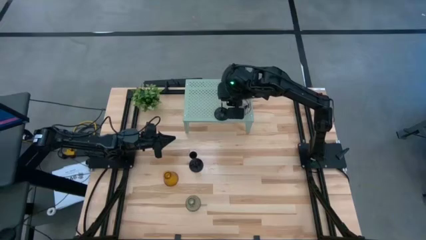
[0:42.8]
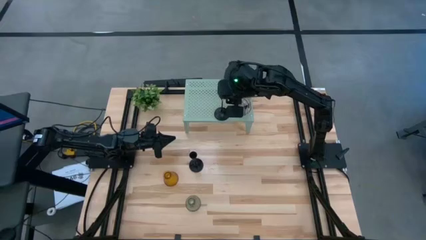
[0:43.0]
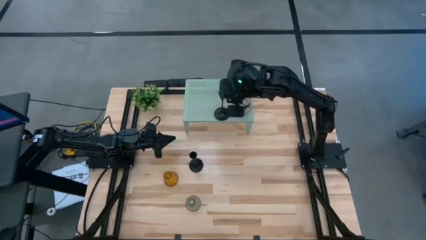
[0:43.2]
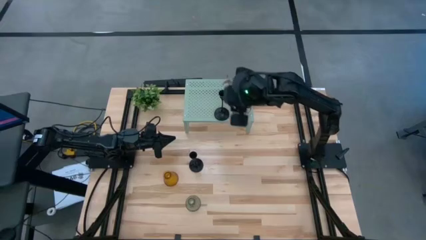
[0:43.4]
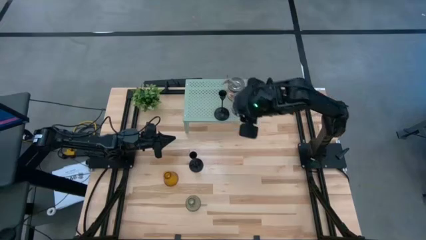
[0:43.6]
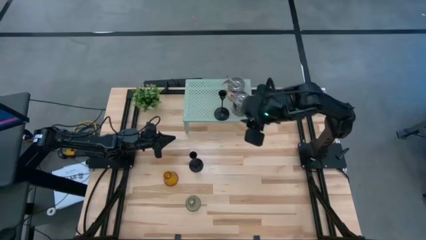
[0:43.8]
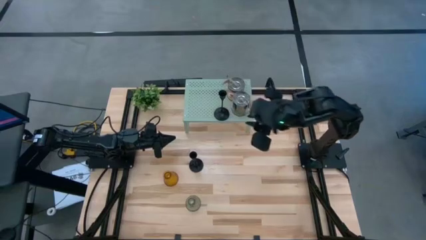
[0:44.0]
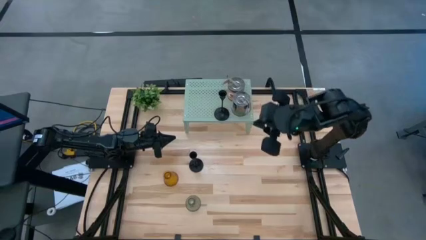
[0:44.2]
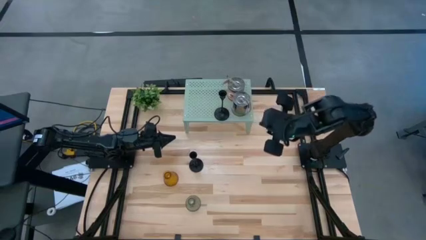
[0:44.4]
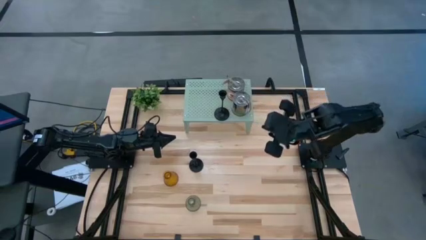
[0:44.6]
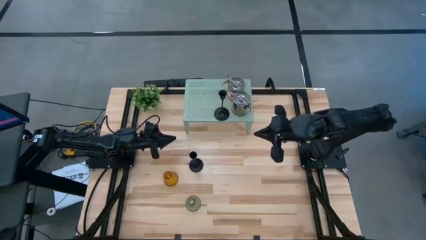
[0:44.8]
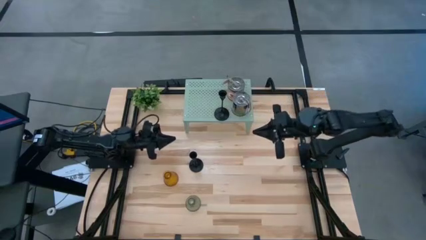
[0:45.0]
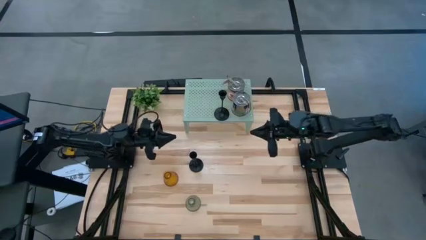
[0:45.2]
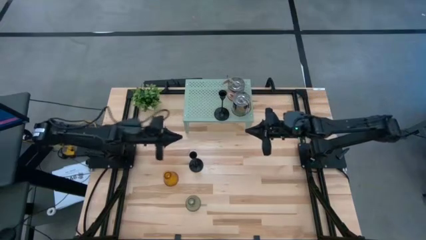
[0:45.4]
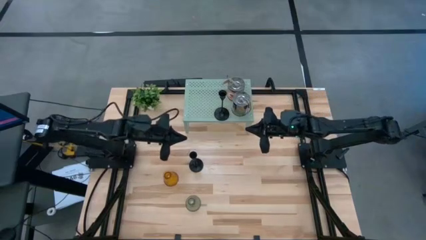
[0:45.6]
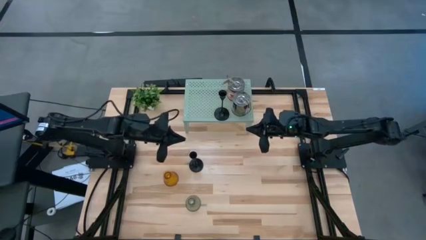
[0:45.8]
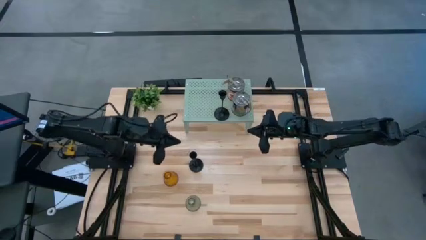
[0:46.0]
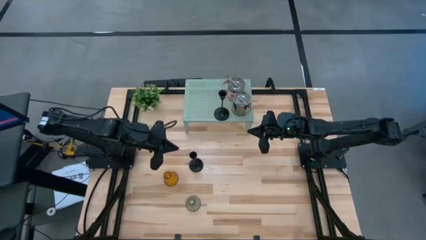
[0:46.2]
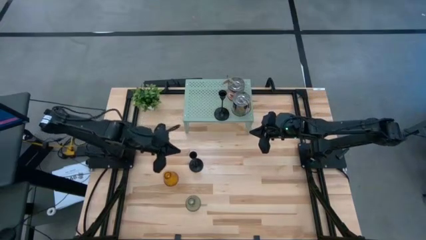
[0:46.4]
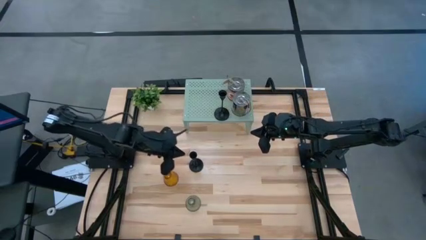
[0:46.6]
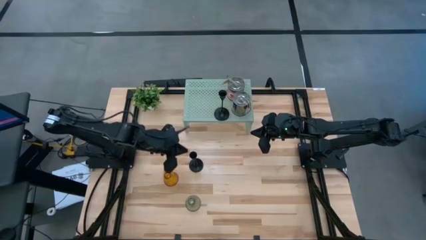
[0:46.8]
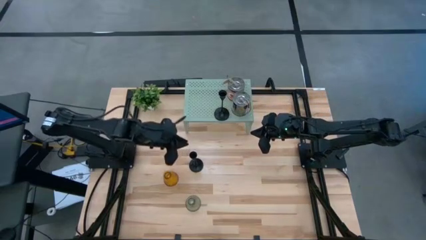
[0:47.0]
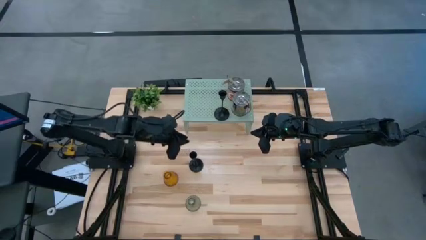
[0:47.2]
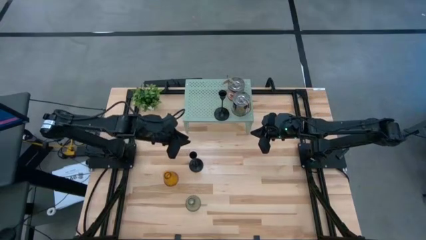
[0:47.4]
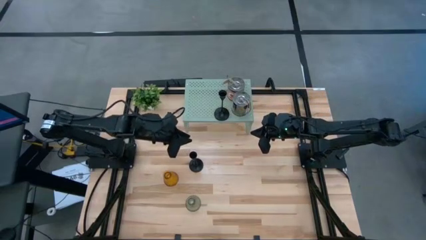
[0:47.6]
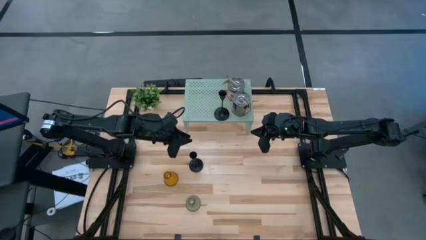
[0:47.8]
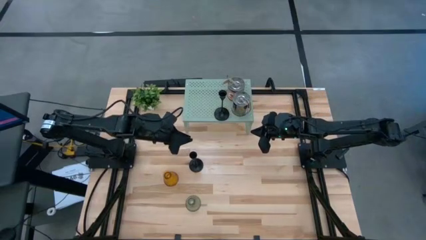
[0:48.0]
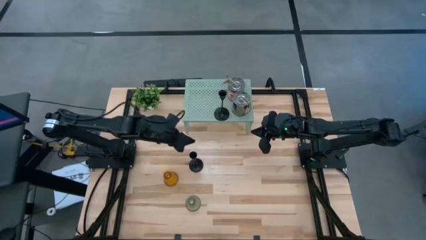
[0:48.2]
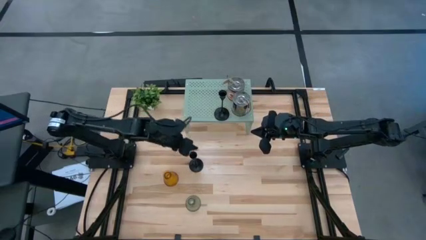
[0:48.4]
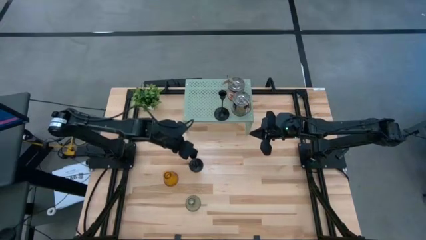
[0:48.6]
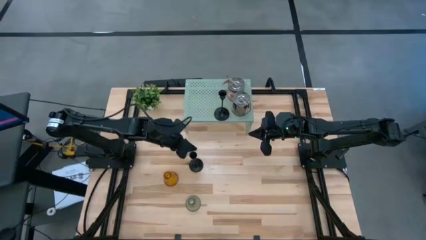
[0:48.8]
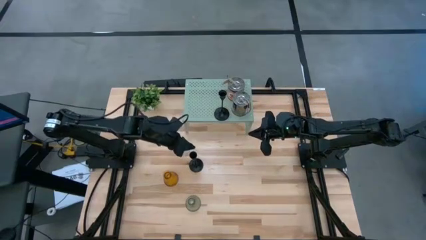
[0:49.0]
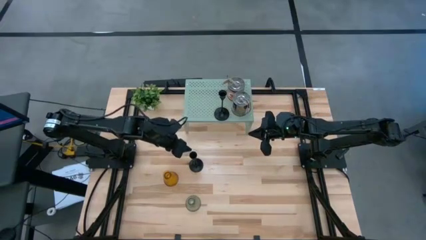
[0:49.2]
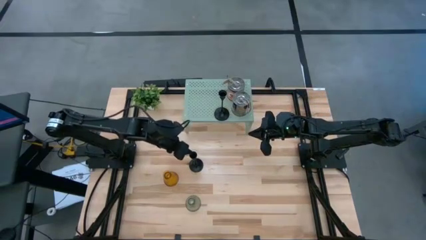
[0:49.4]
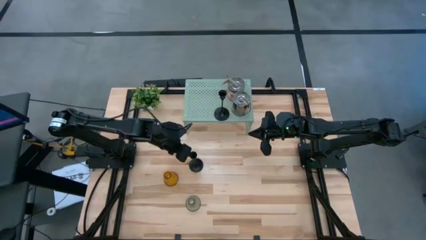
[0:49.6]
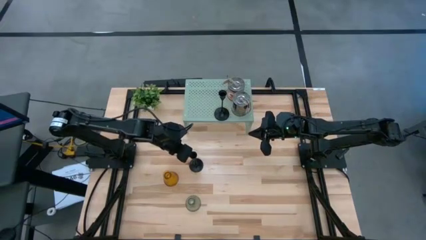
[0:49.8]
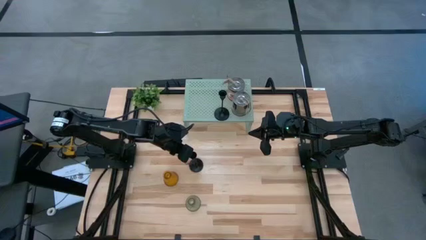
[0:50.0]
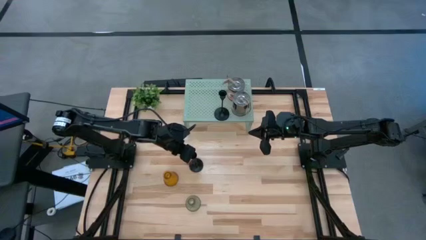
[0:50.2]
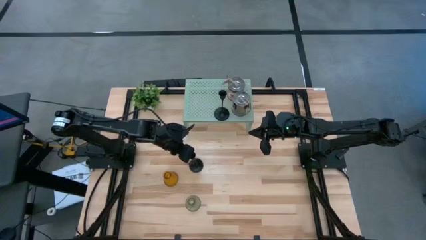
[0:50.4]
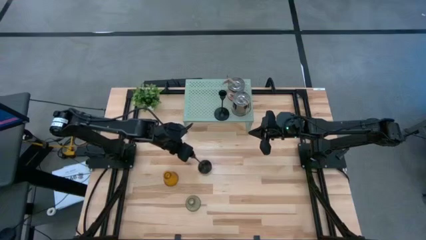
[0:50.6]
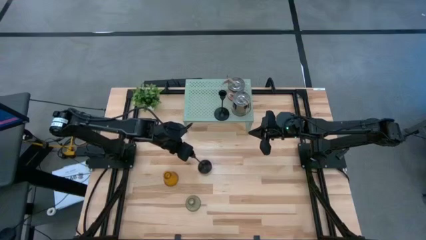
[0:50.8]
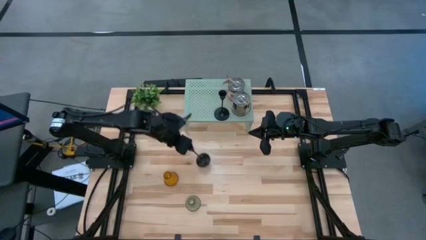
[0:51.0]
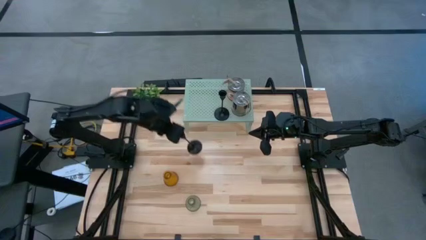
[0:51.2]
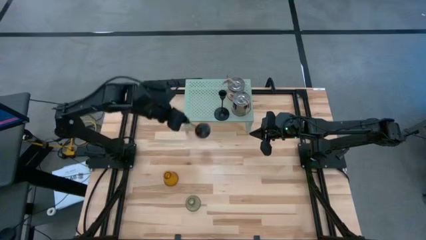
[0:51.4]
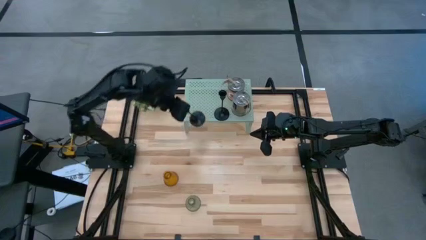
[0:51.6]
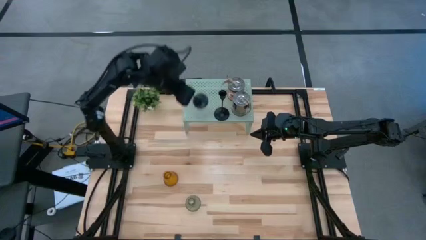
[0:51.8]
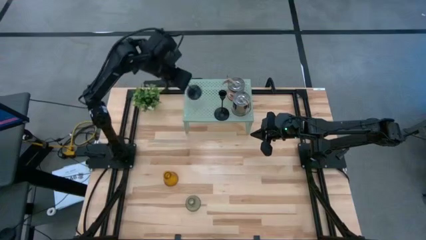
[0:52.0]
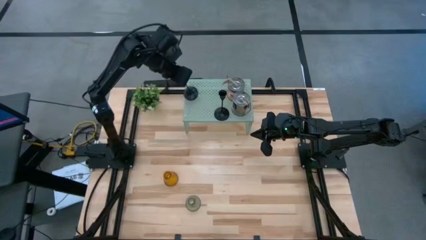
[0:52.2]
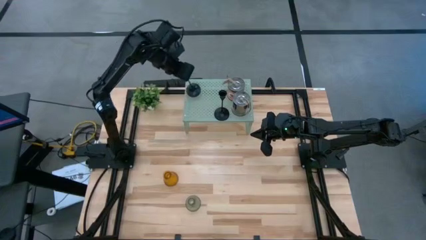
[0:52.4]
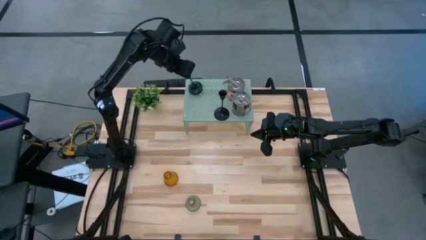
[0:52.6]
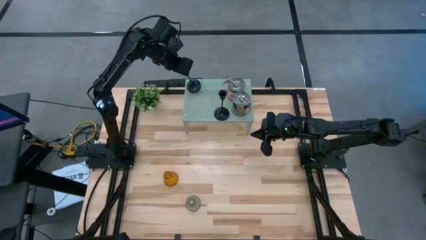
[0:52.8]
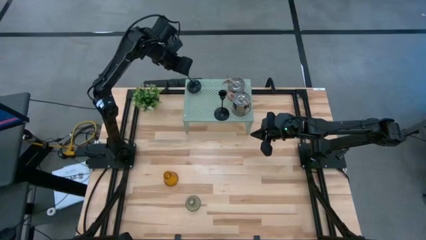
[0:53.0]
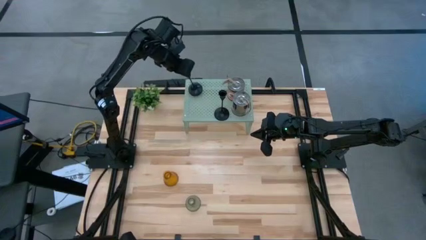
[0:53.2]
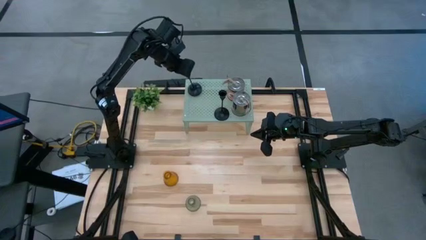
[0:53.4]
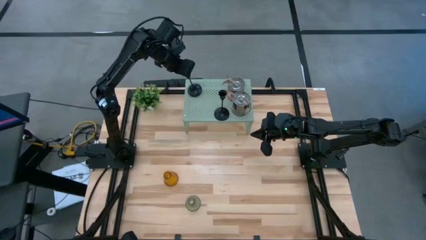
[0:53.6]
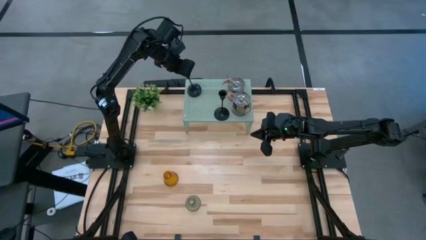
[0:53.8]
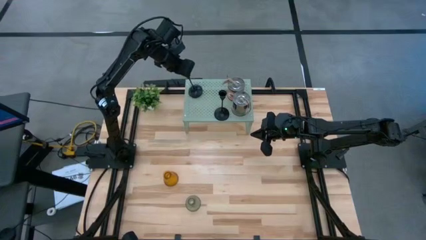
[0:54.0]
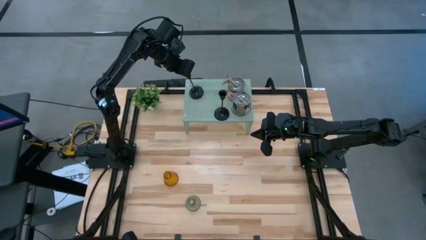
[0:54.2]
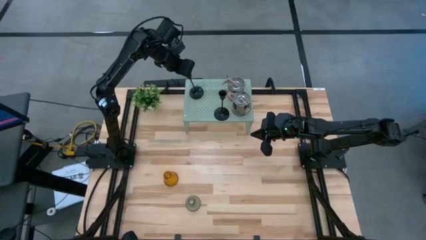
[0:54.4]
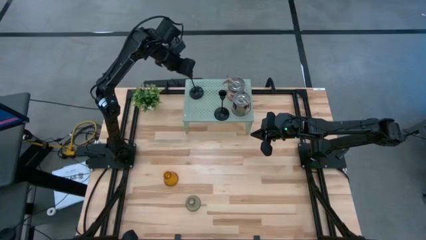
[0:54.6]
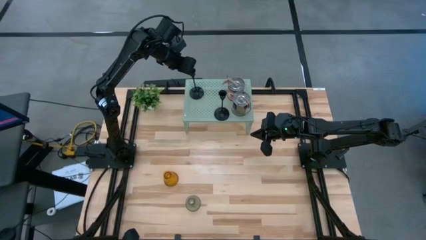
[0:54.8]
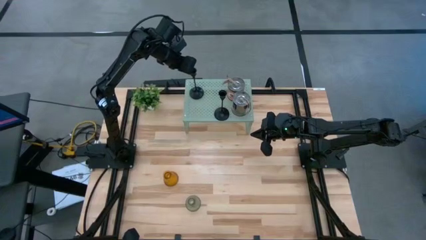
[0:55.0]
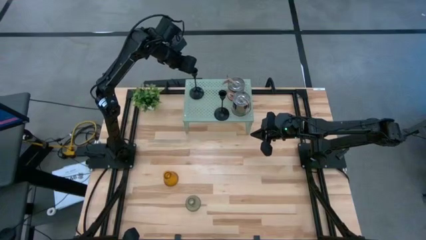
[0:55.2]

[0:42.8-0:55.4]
Task: Pick & Place candle stick holders
Put the black candle holder on the shelf
